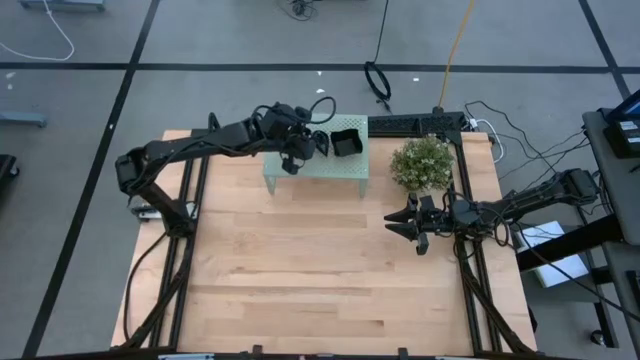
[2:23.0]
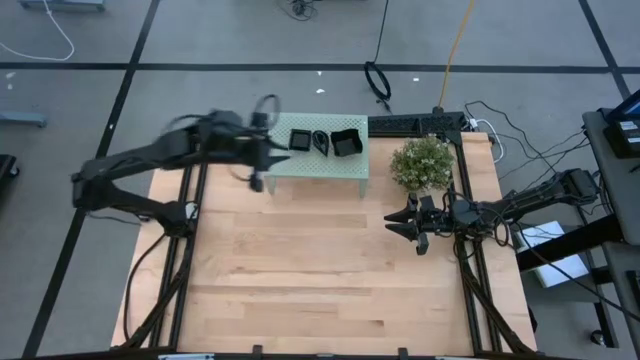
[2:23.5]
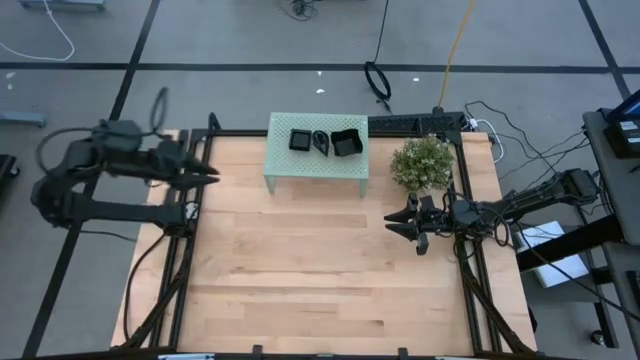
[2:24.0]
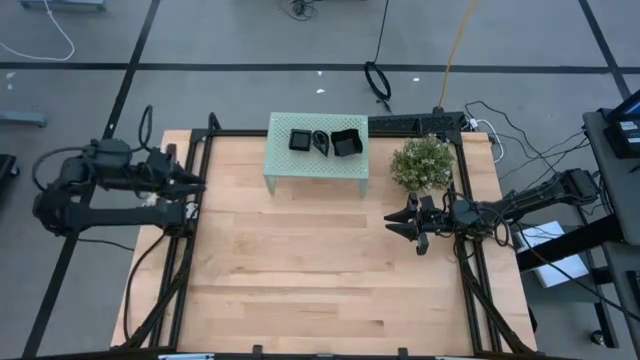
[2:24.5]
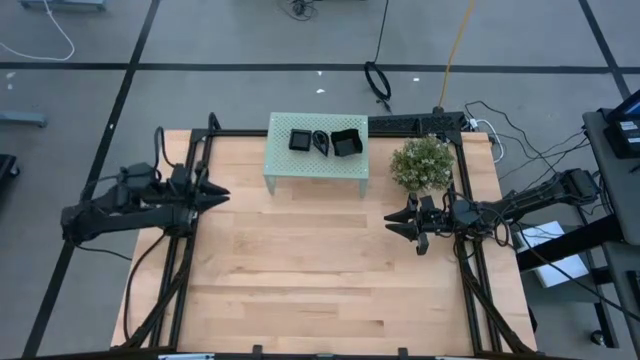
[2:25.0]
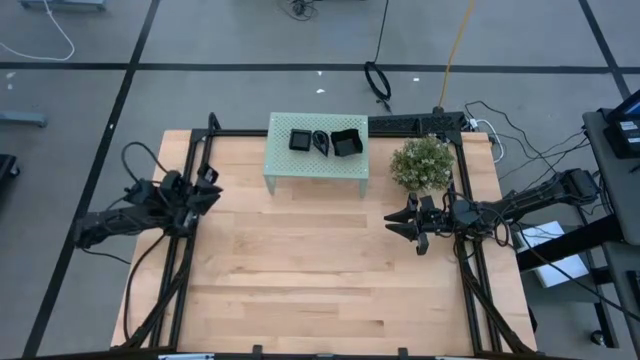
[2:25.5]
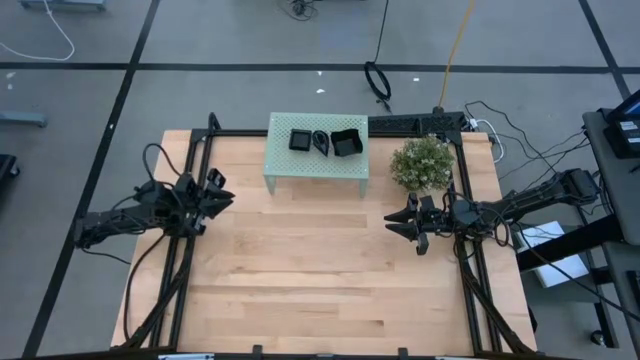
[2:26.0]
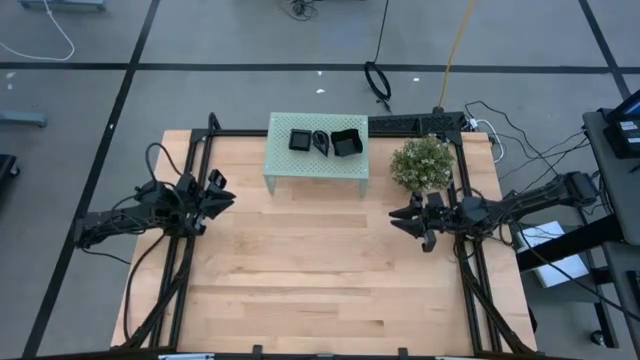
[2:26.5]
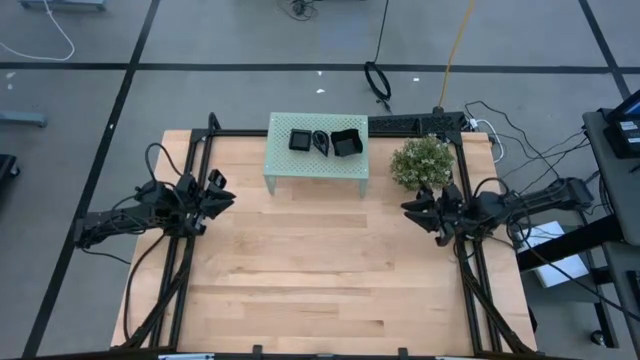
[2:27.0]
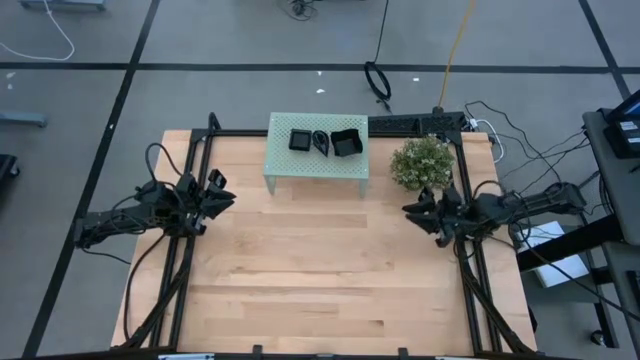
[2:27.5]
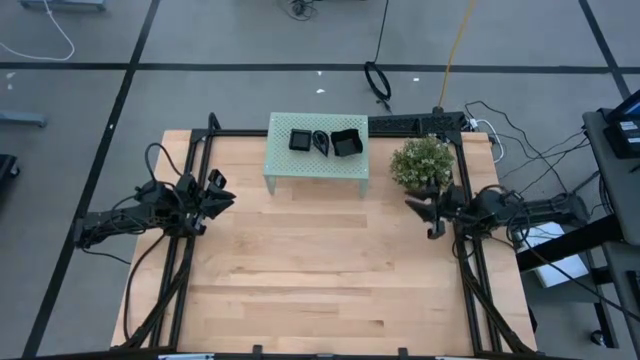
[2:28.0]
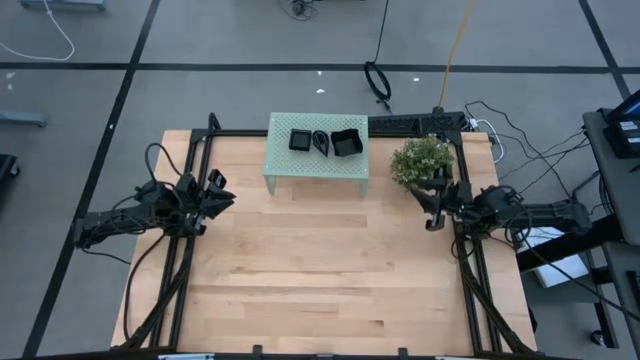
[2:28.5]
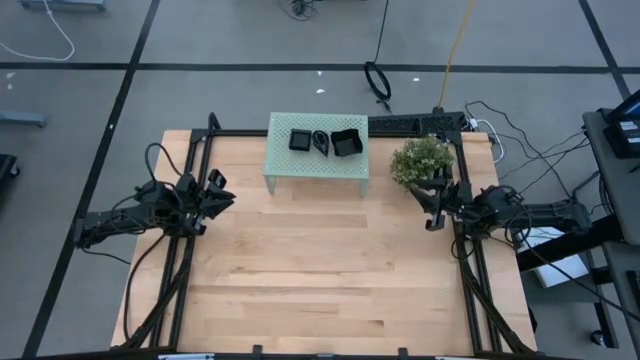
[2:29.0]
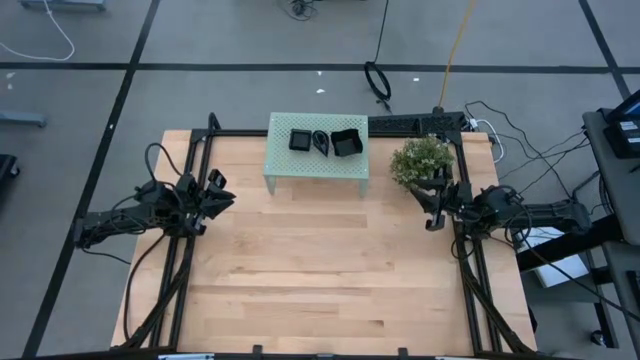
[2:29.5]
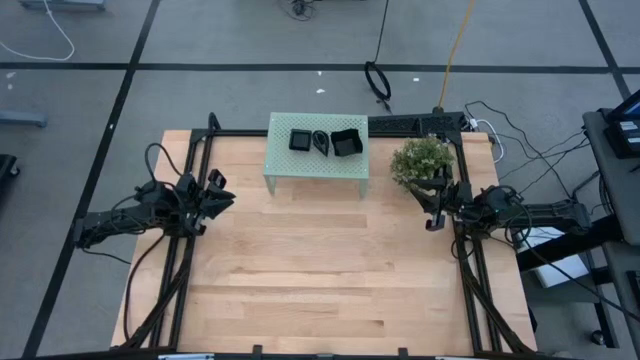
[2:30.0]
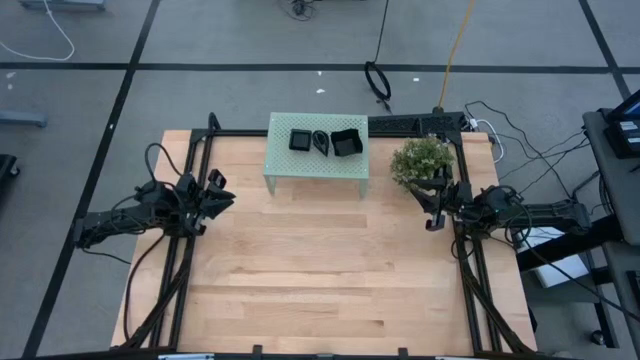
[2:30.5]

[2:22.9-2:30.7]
Task: Pick & Place Mini shaped plates
Return to Home Position

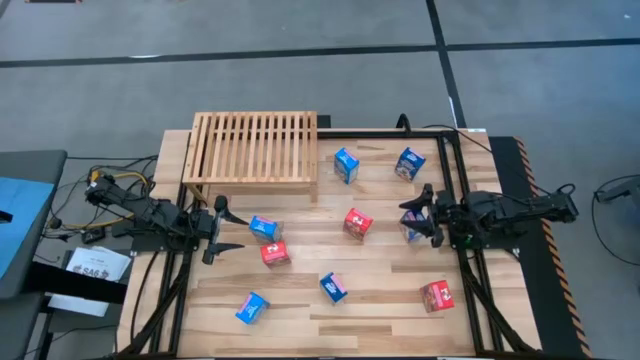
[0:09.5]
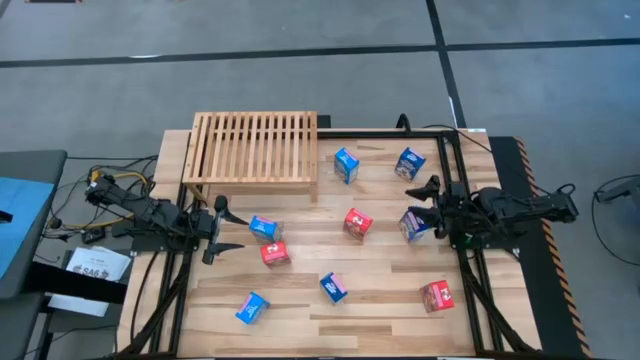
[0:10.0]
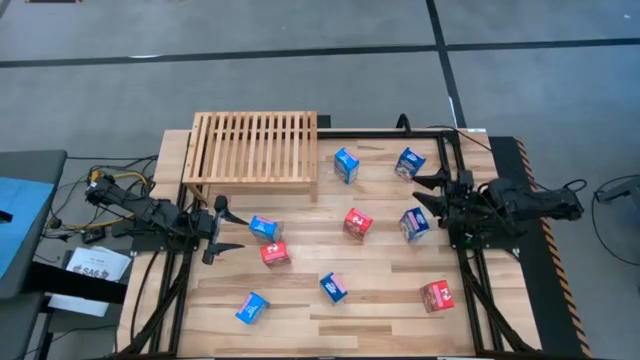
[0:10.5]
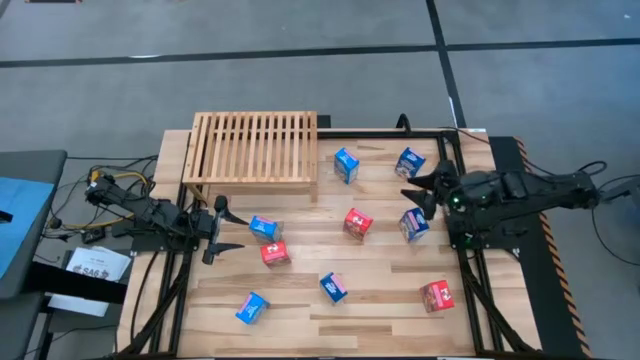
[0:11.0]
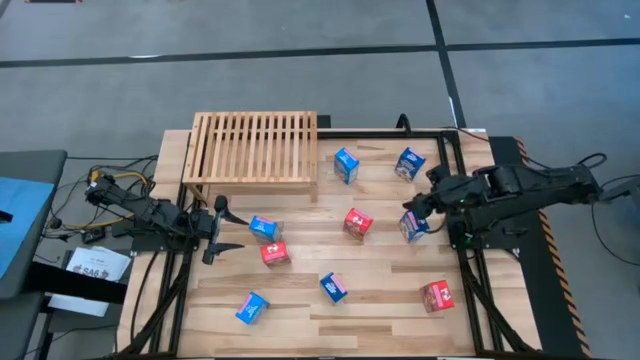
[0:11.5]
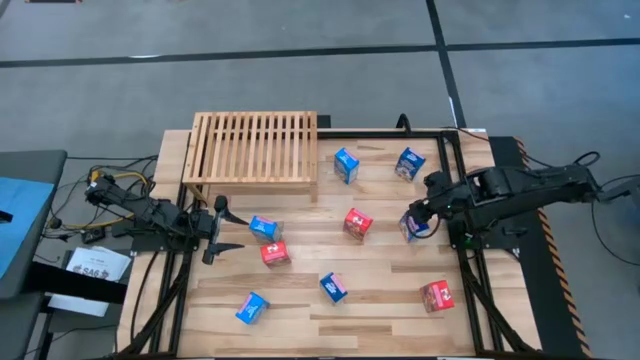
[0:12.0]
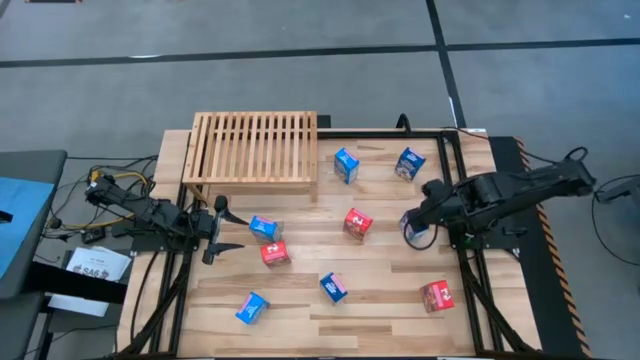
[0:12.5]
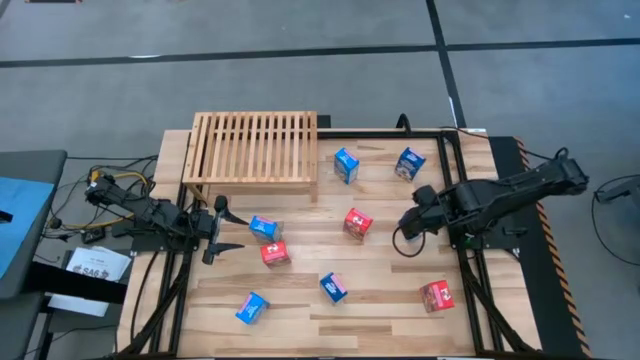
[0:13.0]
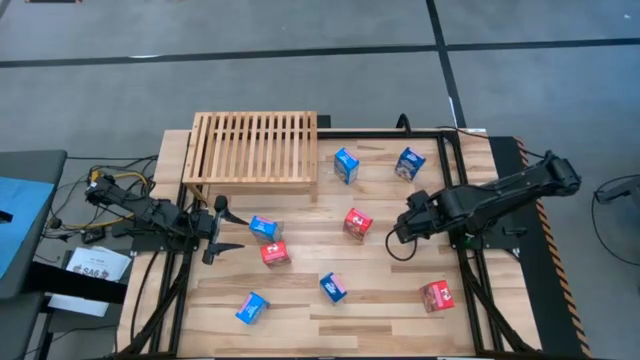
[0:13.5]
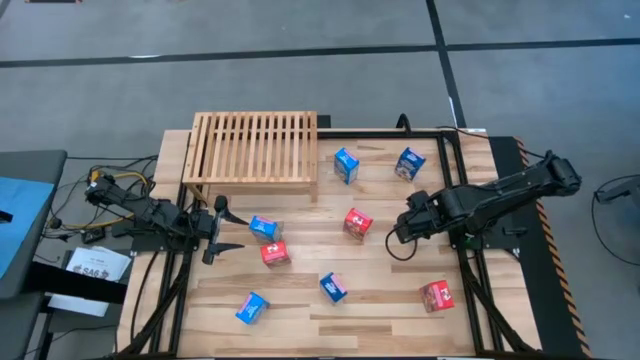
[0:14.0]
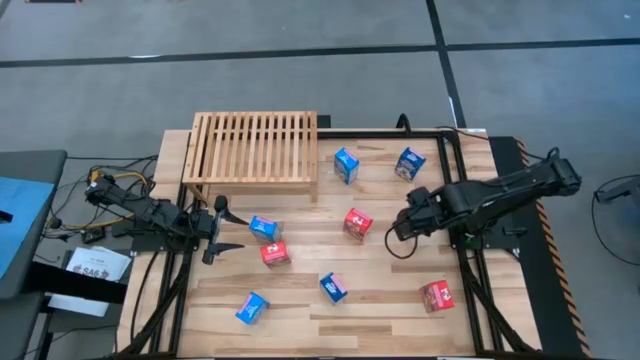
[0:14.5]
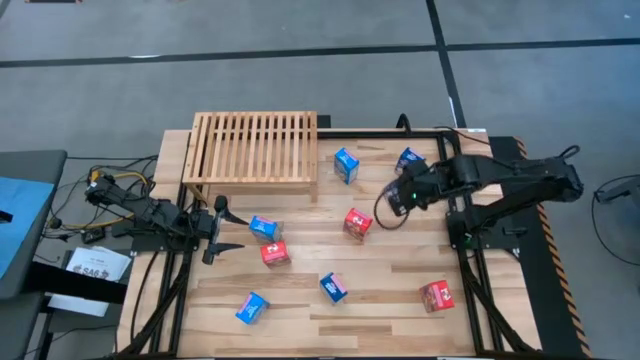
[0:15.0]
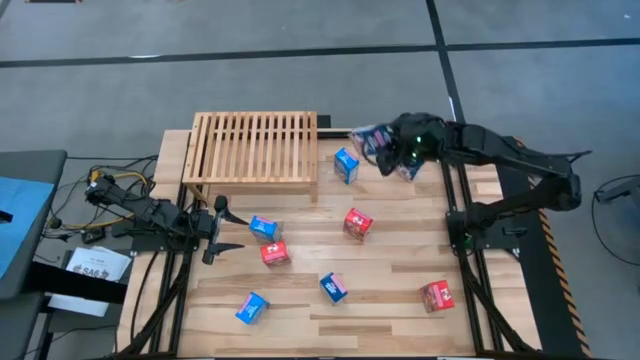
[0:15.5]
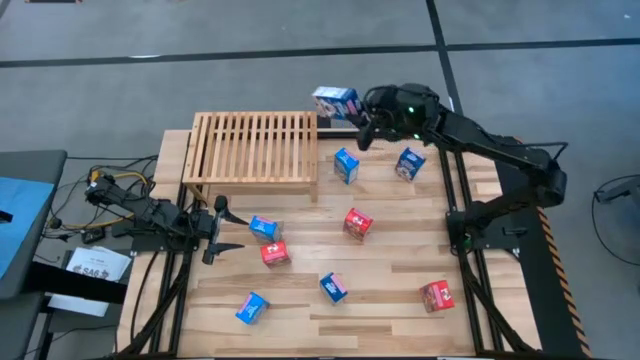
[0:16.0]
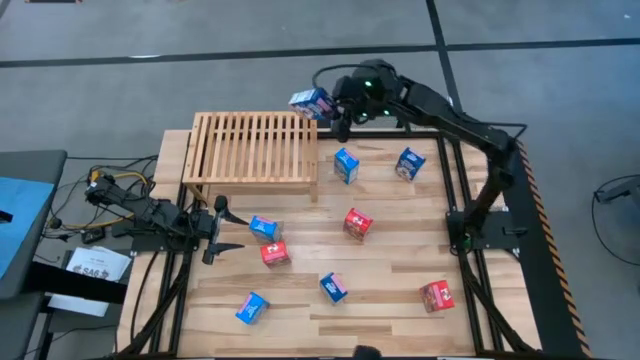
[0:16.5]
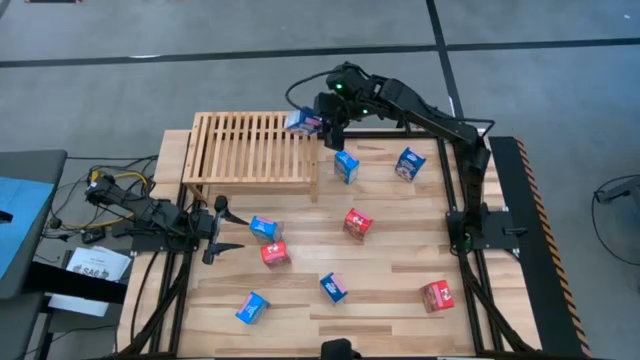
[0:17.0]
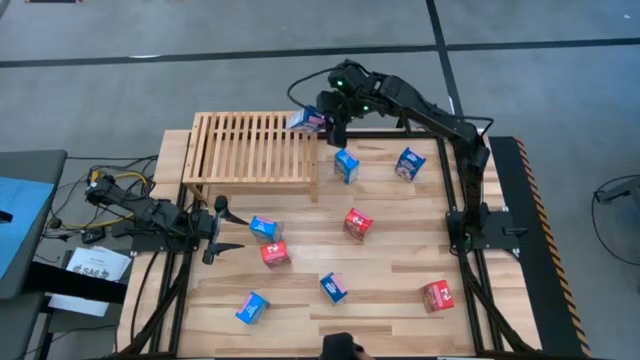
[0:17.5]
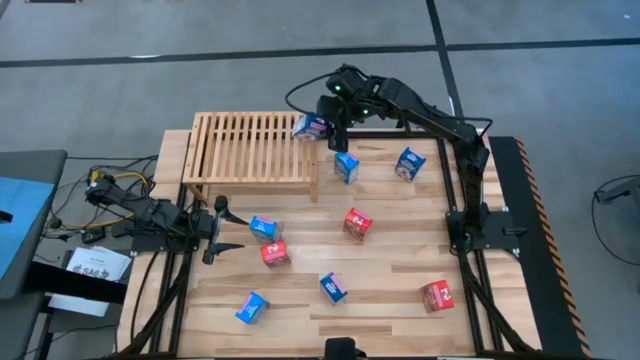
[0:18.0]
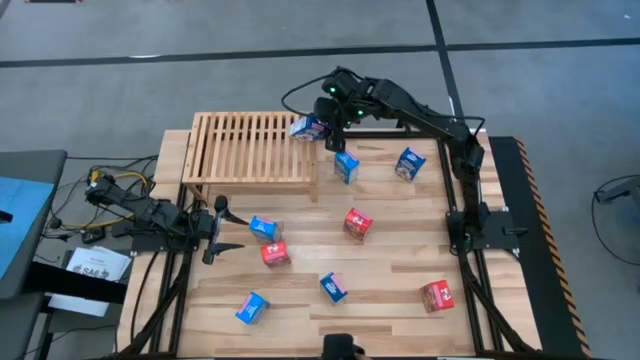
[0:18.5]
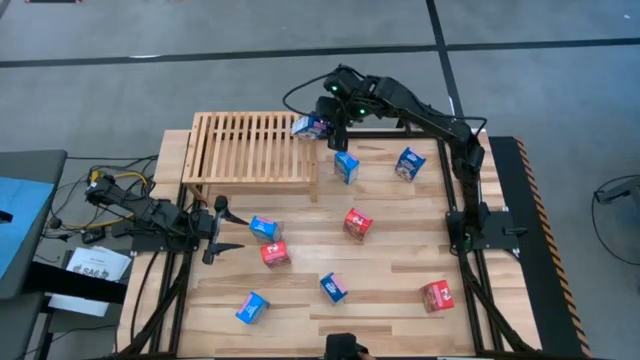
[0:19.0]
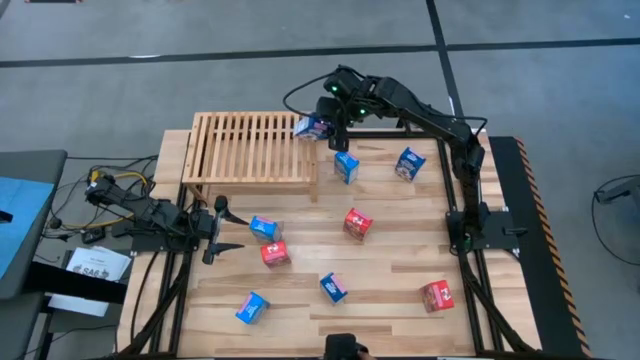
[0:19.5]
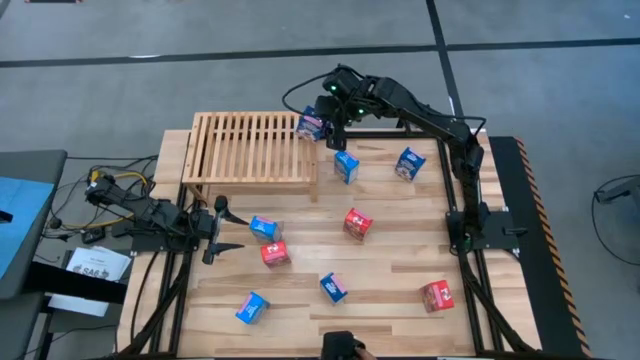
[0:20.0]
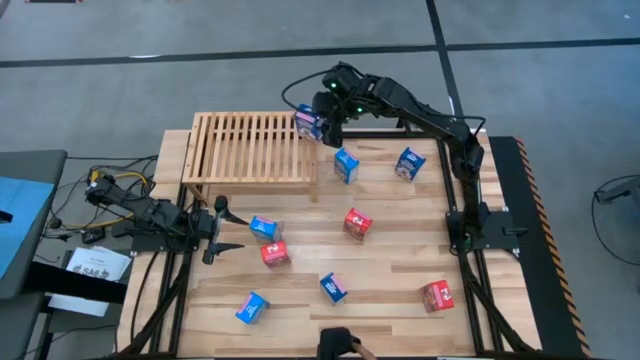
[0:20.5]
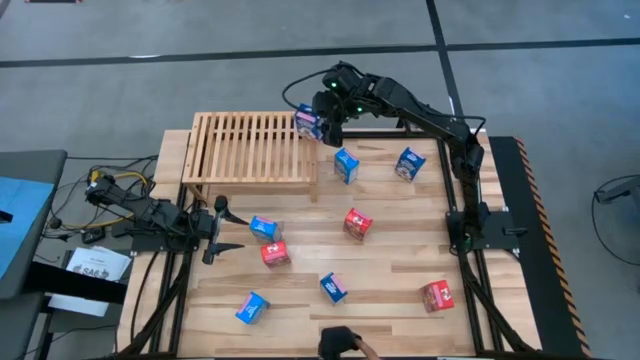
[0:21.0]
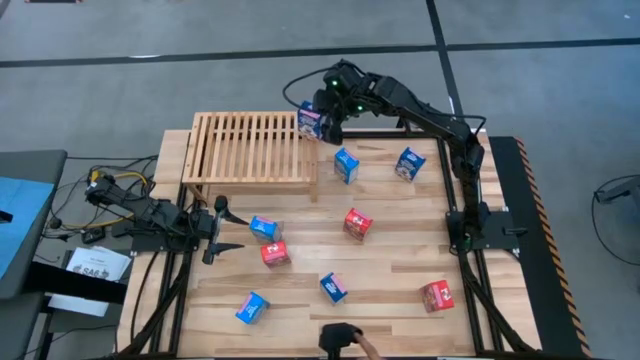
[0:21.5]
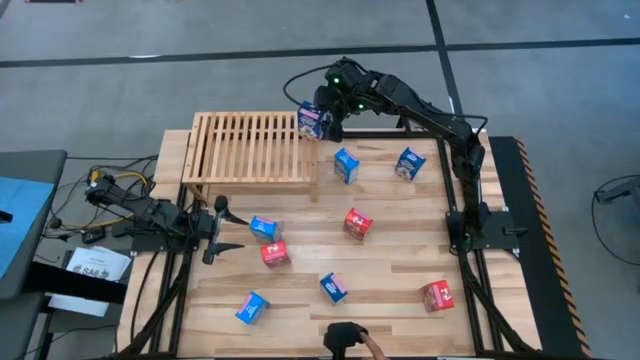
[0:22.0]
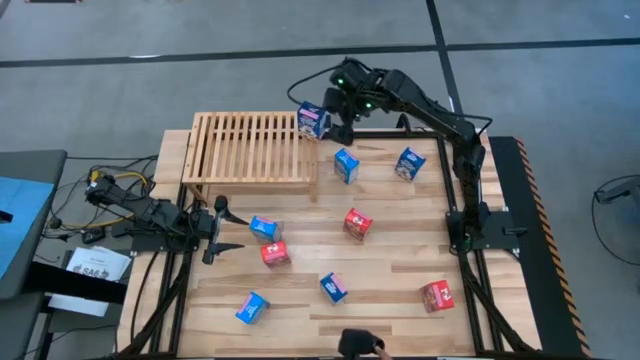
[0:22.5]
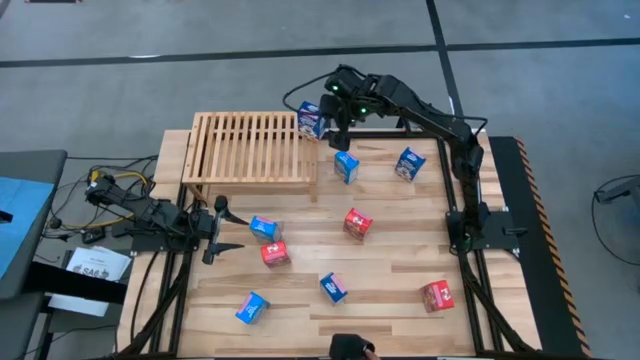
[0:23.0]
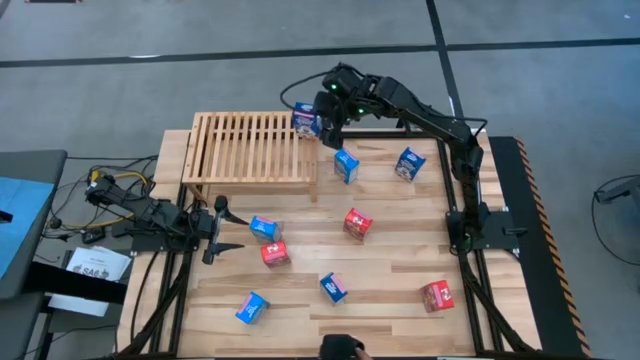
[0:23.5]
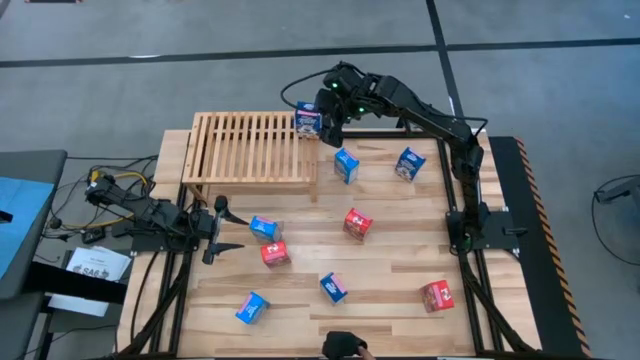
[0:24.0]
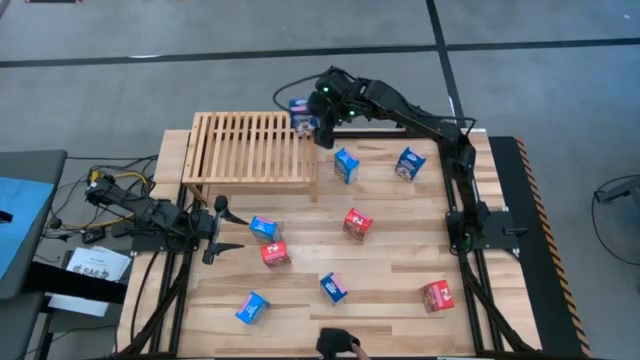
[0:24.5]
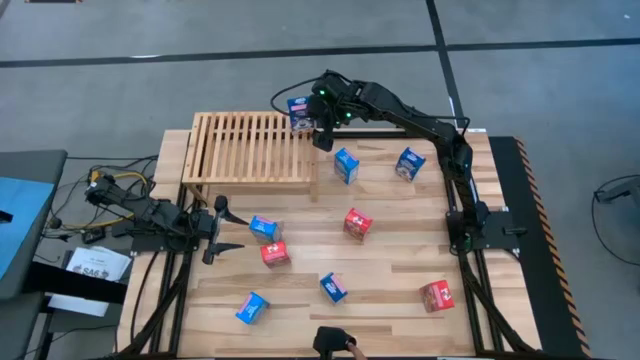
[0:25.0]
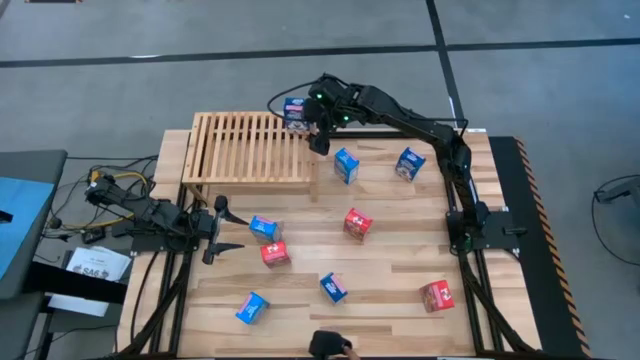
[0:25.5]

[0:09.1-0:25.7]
Task: Stack cereal on shelf
Put the middle dark blue cereal box on the shelf
